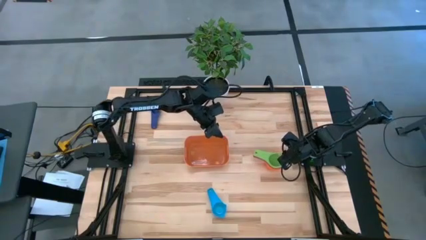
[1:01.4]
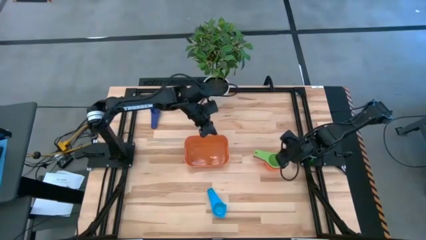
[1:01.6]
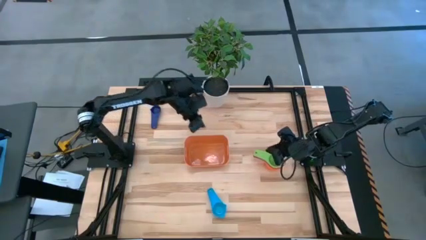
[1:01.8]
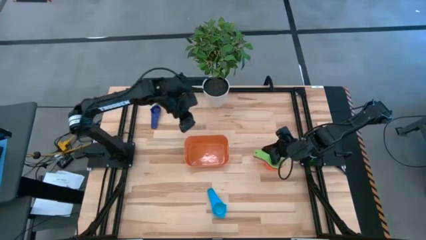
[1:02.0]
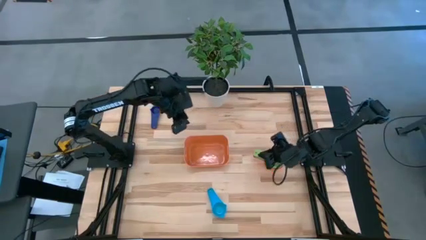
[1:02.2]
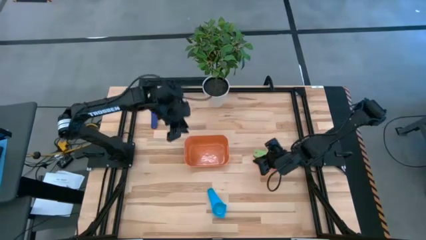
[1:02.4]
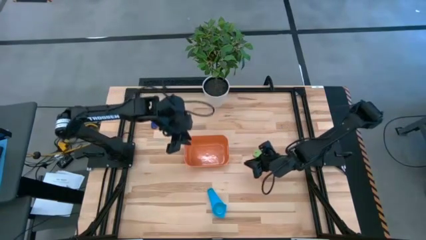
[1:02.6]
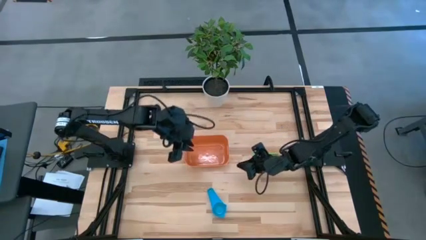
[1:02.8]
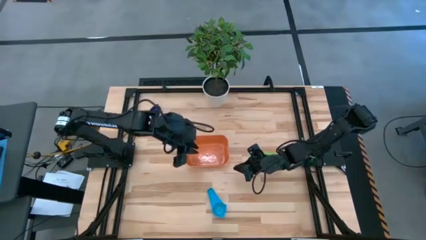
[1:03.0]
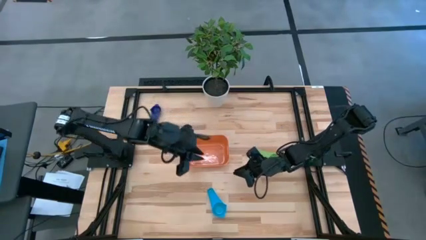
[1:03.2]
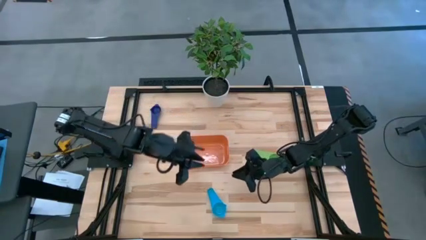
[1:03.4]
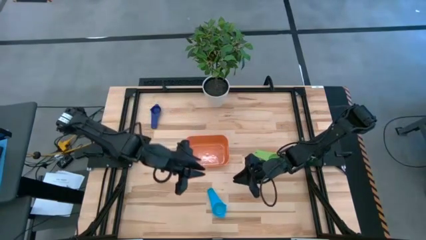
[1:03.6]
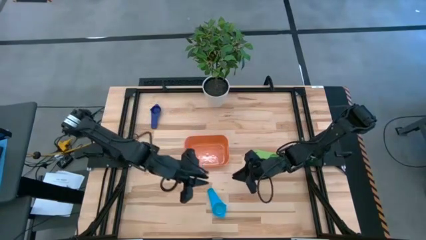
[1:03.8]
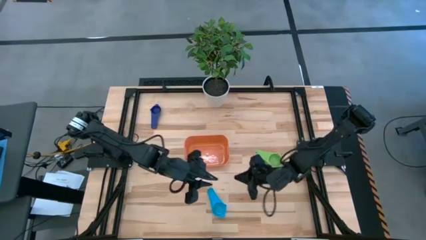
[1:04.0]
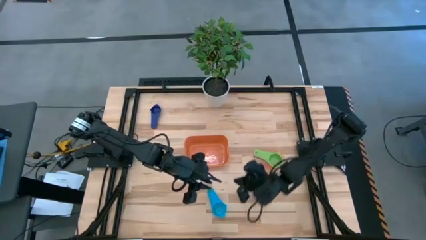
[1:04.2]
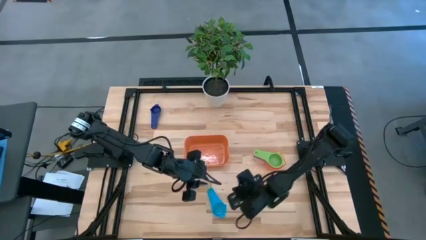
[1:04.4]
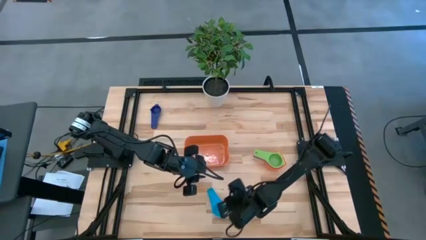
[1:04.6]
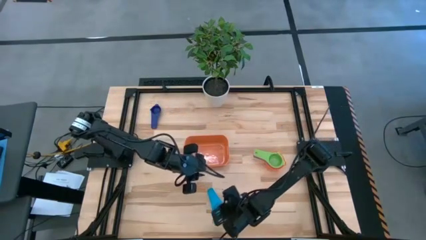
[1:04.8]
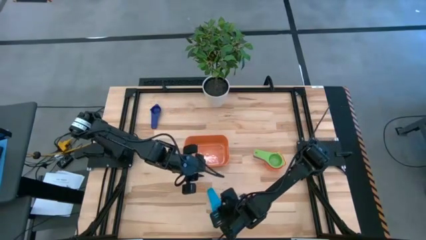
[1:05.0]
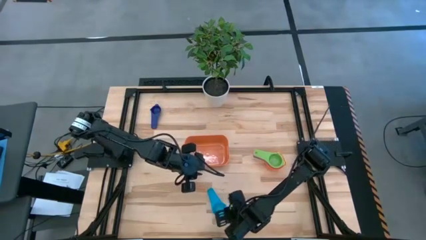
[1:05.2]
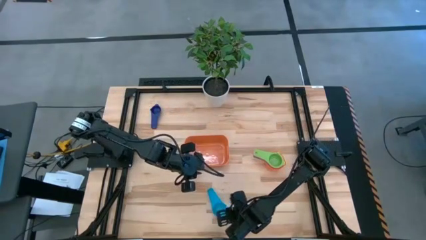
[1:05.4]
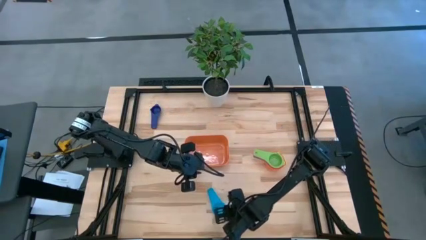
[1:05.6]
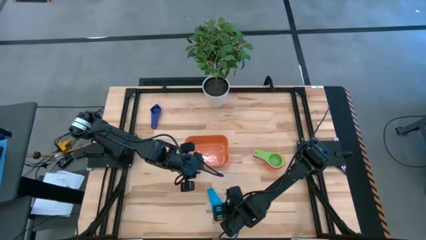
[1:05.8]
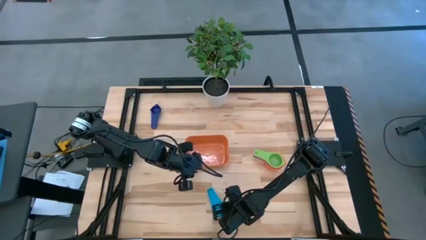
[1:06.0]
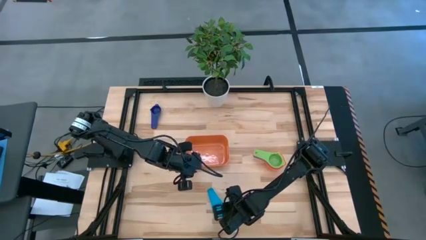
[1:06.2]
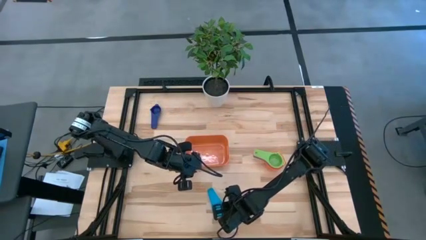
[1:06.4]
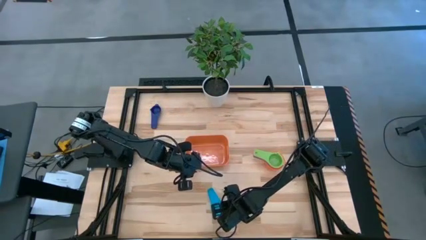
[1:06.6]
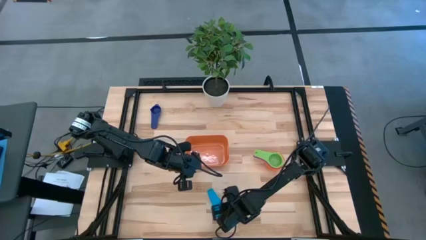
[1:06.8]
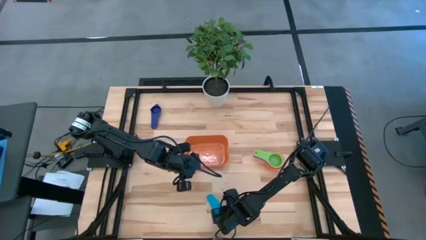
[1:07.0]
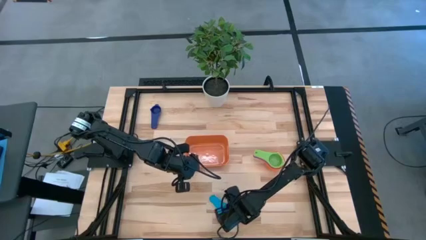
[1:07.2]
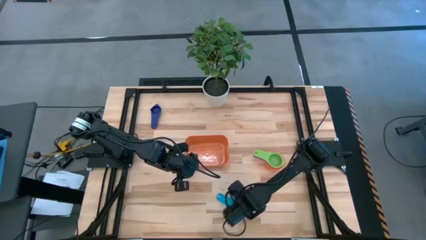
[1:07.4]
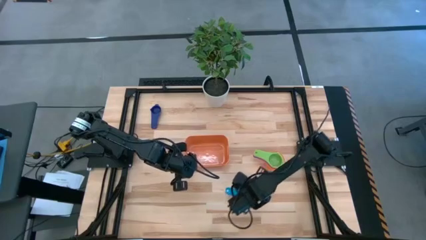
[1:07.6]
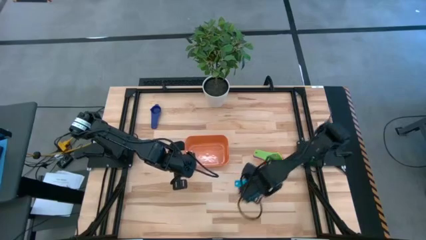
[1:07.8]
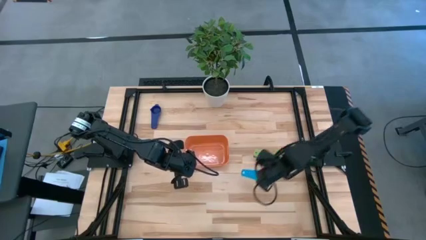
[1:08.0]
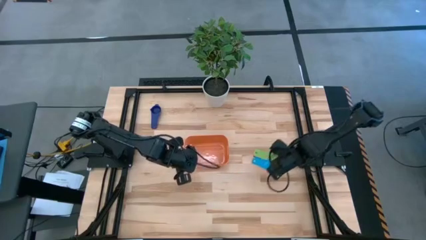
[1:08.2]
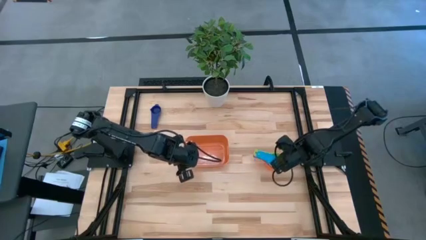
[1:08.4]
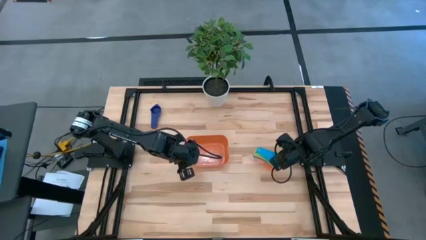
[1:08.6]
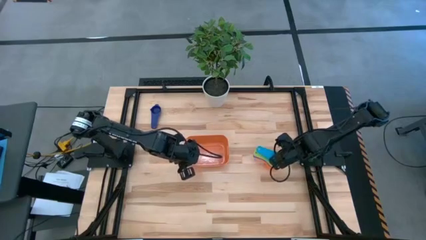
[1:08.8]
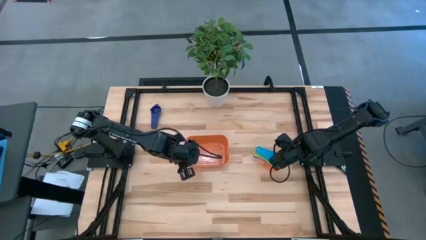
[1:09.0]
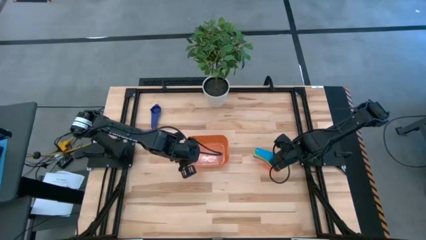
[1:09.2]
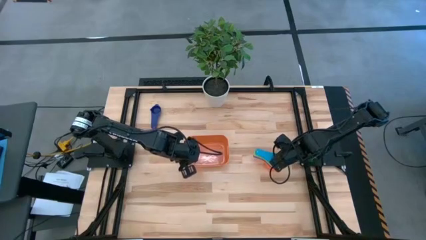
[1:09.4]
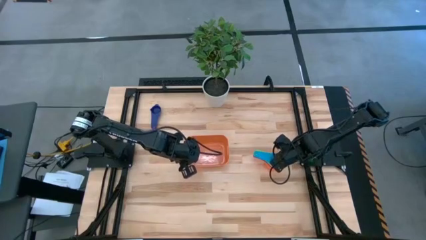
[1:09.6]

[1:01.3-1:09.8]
Task: Nest measuring cups in basket
Stack the light blue measuring cup on top of the green measuring cup
